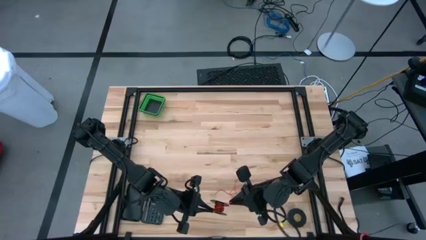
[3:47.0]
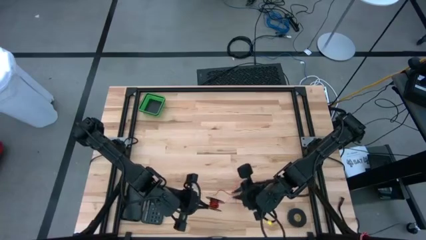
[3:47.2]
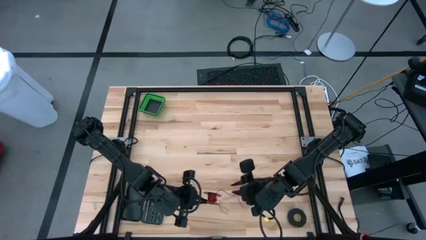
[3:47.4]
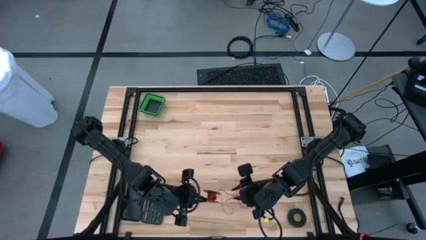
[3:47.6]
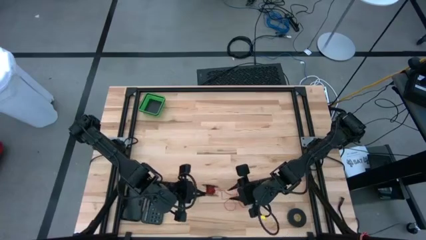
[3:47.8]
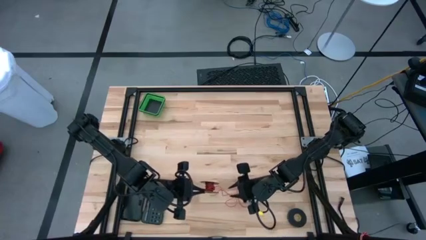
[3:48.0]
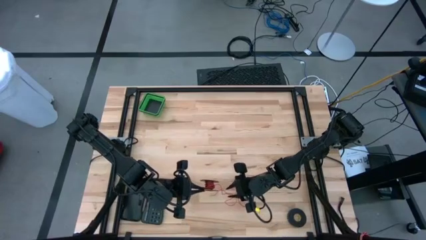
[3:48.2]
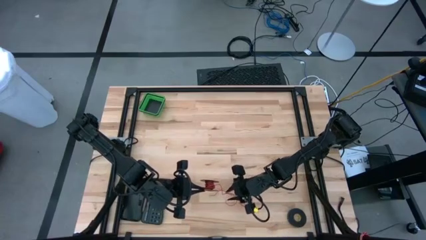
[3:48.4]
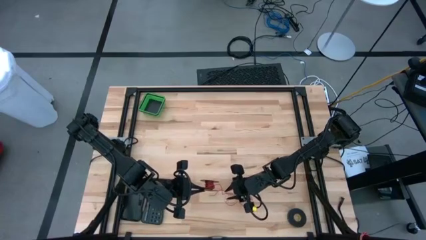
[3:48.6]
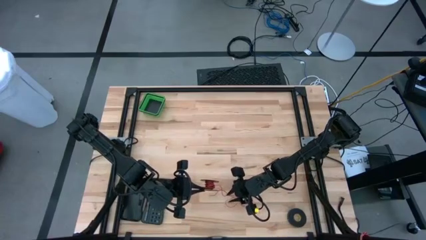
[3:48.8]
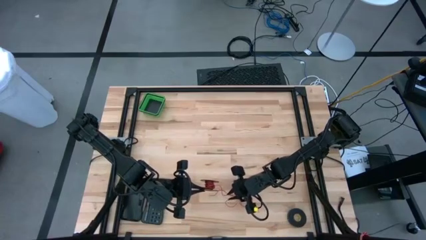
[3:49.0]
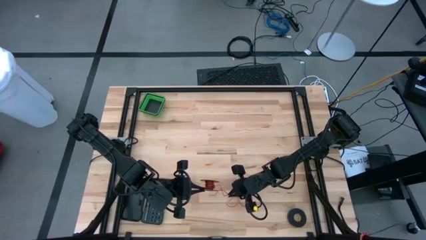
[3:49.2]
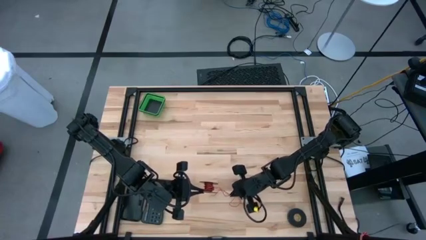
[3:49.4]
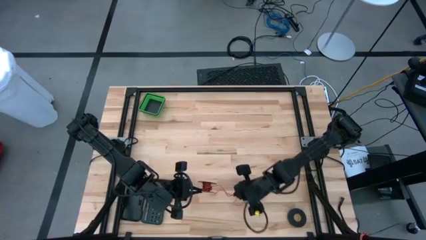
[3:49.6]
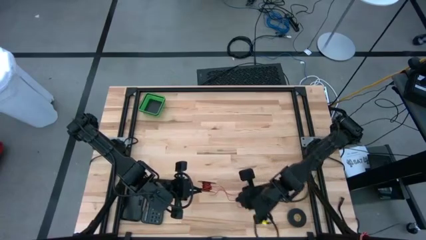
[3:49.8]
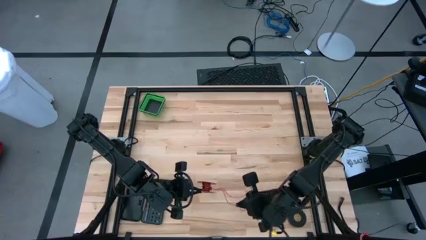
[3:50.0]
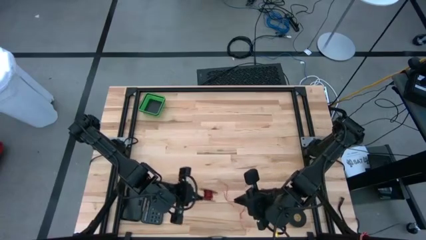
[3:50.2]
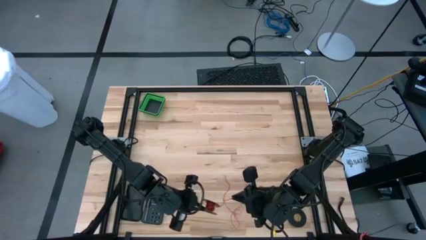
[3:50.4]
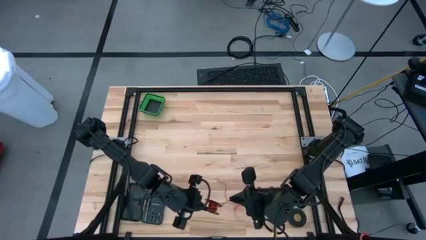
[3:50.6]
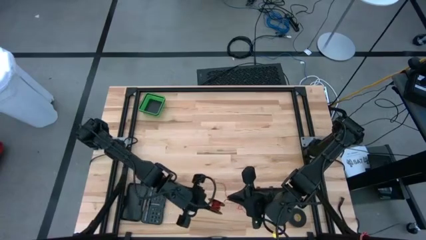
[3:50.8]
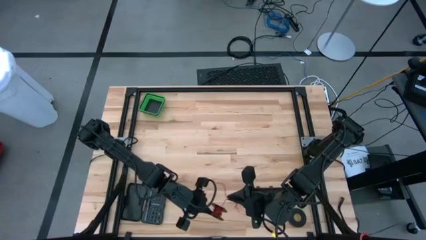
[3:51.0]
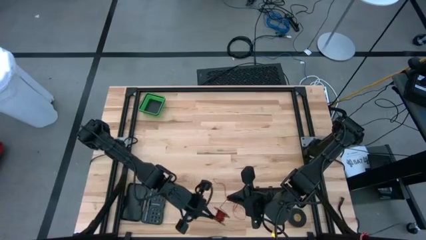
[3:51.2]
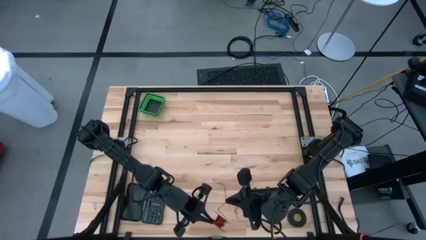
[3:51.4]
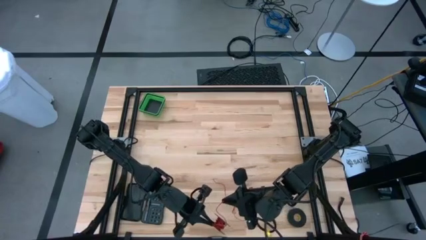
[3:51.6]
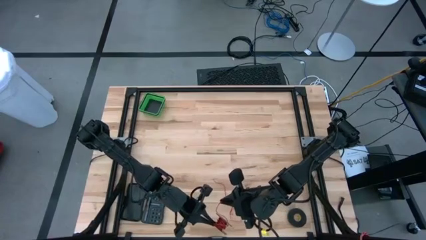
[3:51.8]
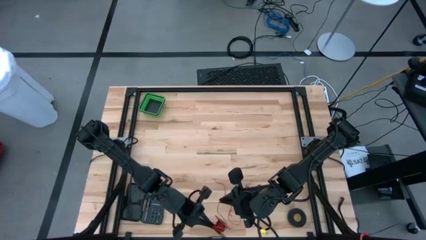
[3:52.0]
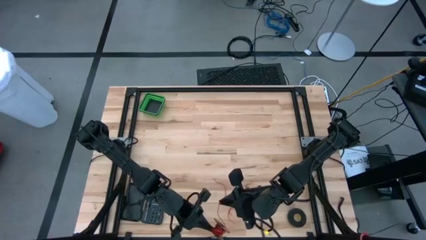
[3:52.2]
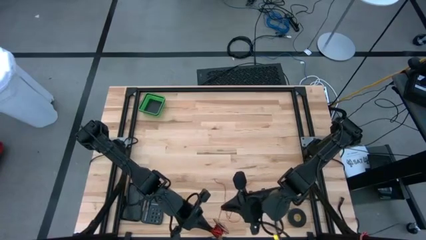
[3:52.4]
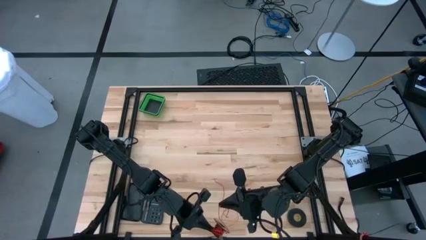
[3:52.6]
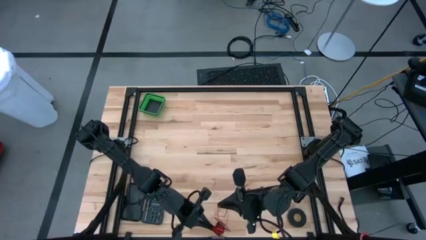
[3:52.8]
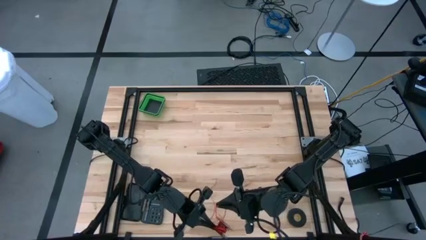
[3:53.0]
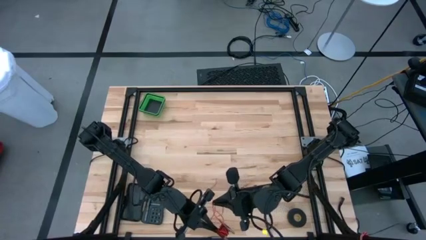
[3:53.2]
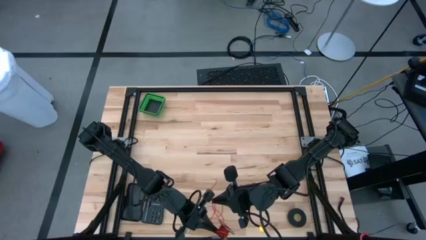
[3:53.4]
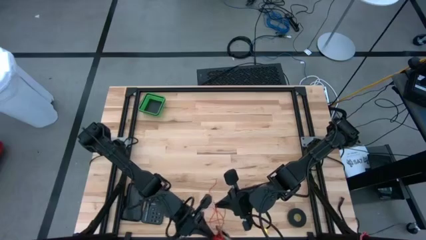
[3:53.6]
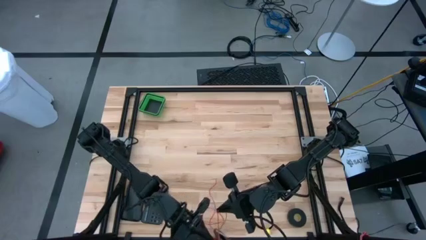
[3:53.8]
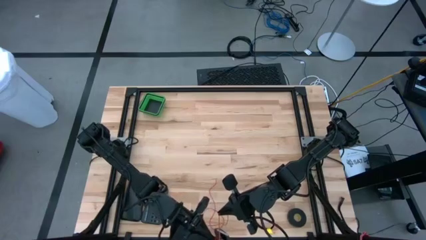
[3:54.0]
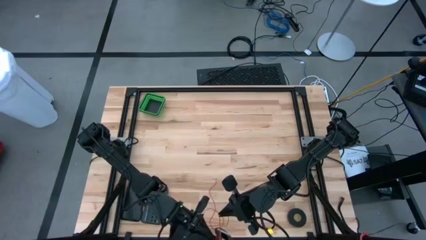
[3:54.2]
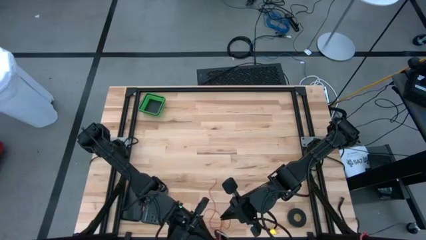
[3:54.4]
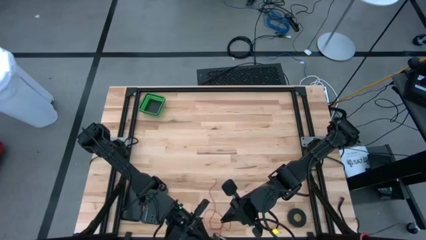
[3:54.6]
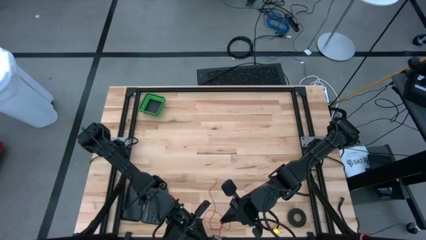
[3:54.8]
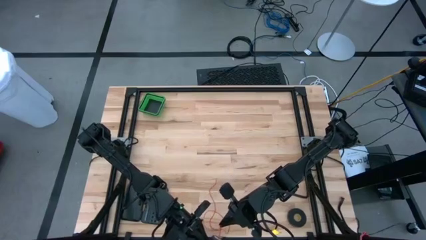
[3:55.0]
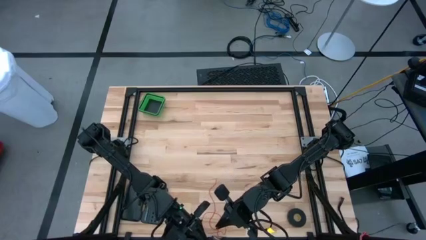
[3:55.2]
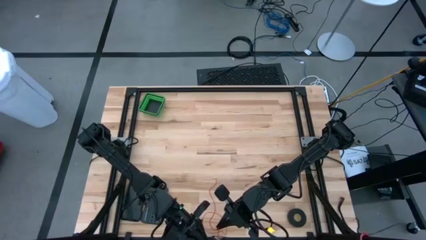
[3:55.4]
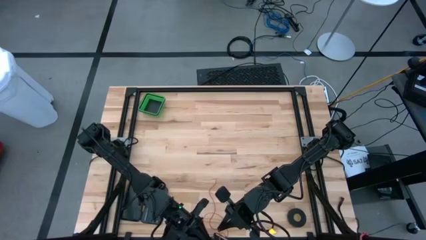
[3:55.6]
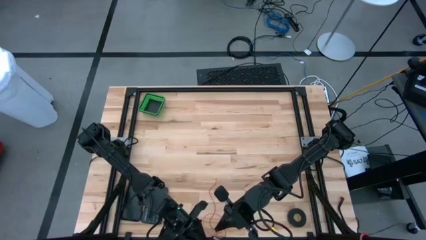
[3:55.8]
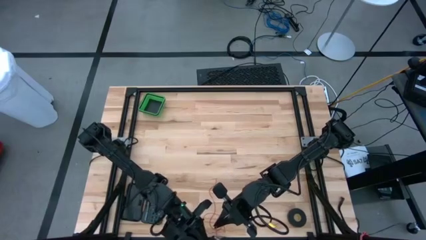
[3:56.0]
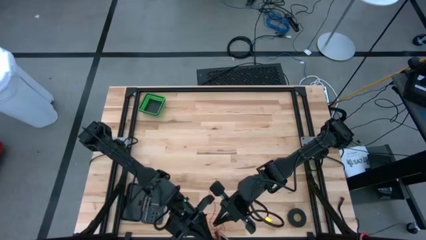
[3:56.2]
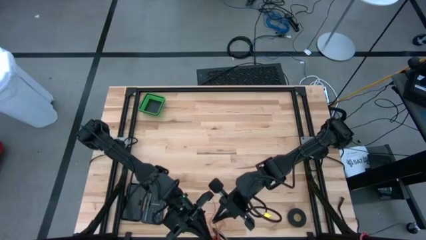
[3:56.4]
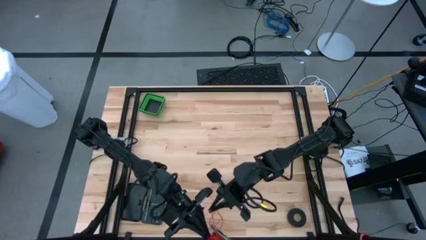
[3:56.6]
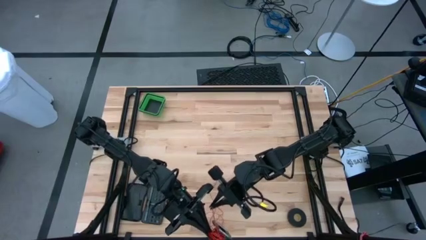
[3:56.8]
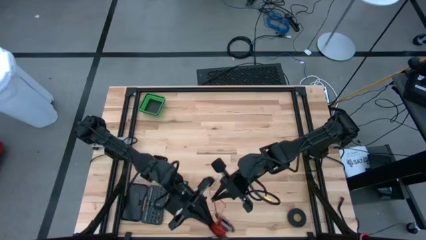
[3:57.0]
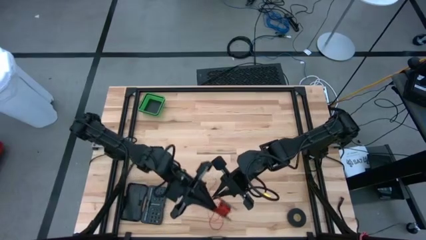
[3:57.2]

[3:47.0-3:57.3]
Task: Coil cords
Coil the red wire into the spool

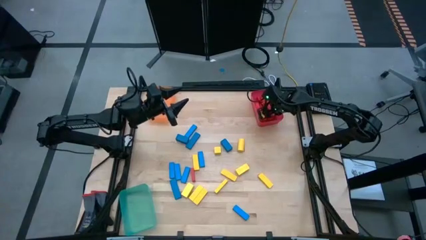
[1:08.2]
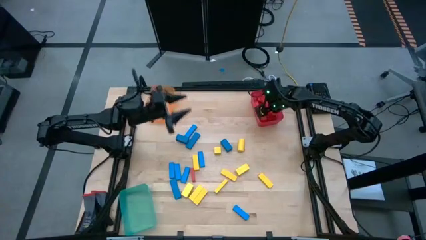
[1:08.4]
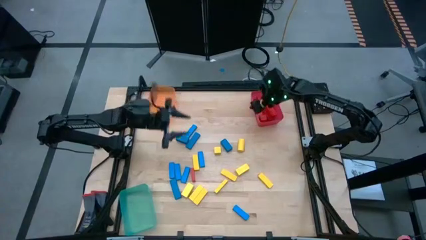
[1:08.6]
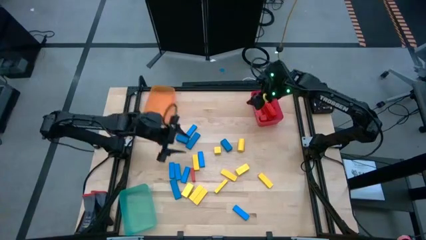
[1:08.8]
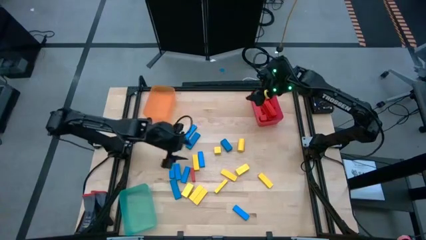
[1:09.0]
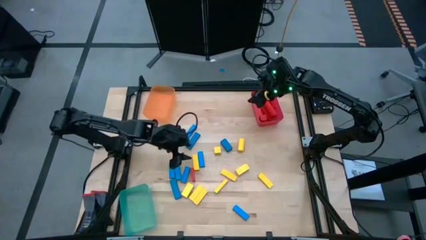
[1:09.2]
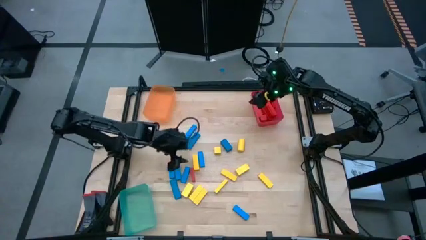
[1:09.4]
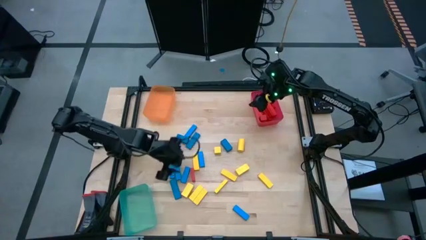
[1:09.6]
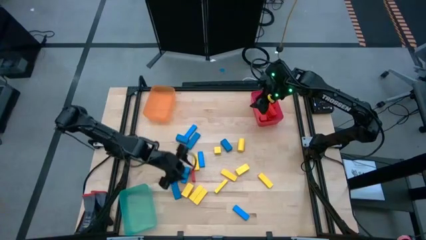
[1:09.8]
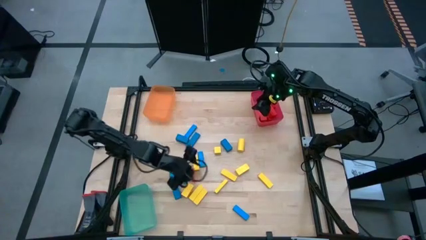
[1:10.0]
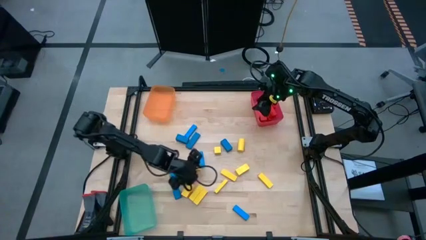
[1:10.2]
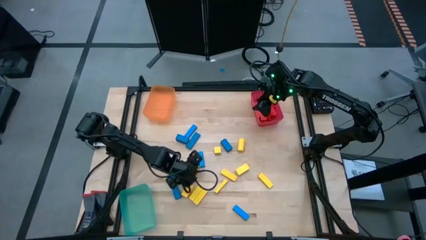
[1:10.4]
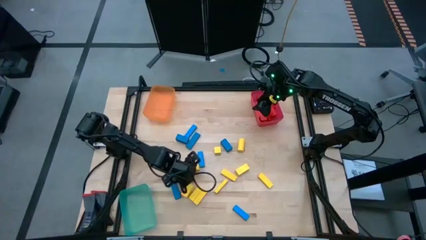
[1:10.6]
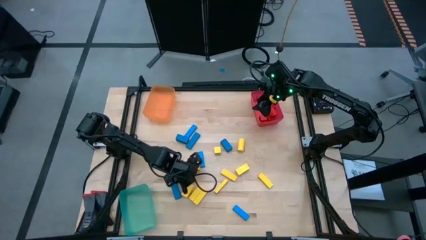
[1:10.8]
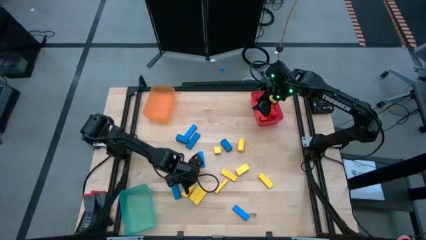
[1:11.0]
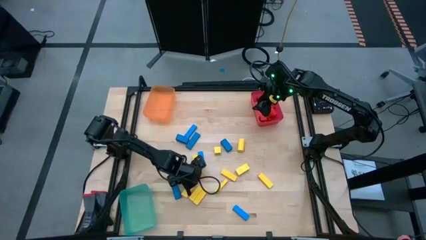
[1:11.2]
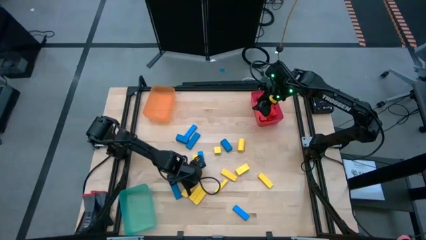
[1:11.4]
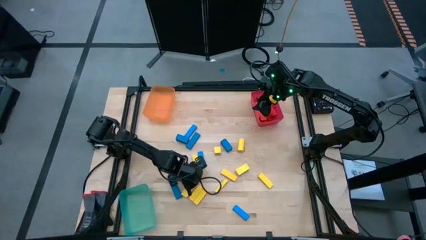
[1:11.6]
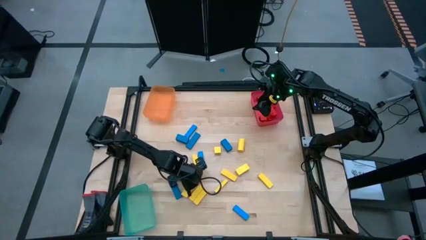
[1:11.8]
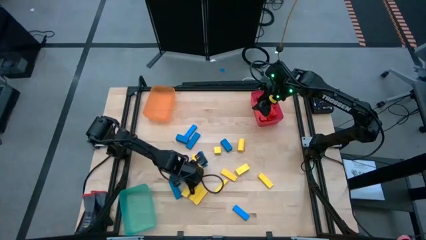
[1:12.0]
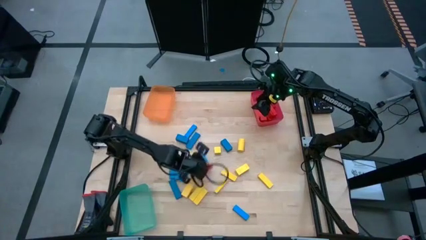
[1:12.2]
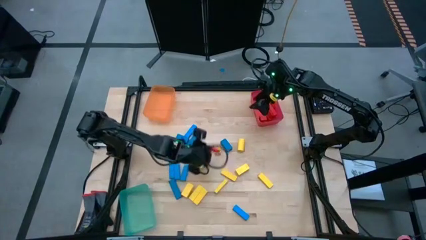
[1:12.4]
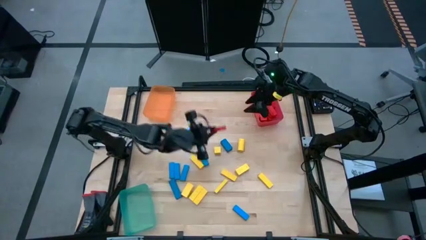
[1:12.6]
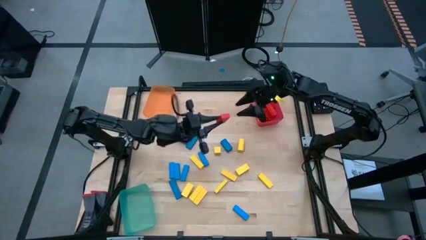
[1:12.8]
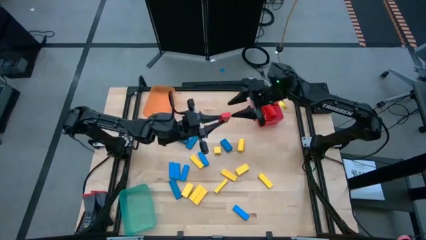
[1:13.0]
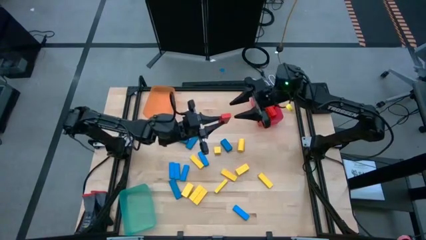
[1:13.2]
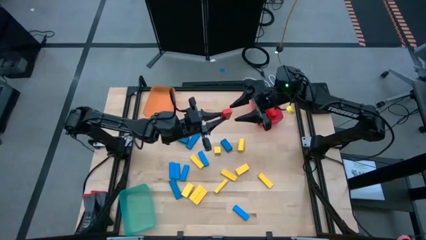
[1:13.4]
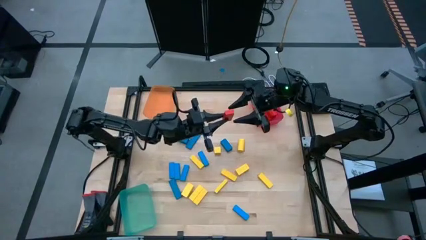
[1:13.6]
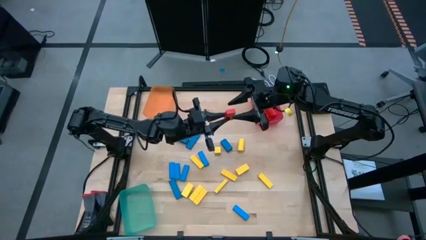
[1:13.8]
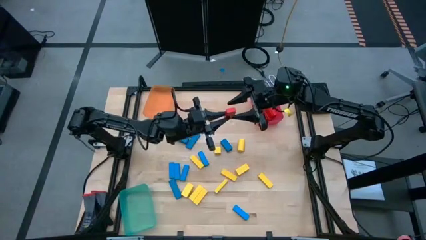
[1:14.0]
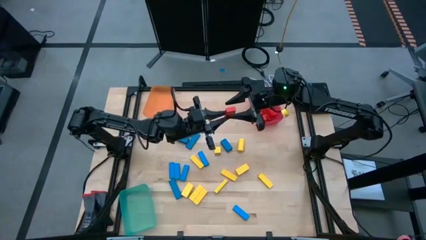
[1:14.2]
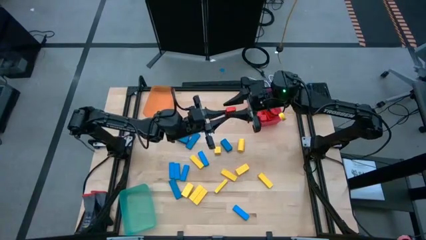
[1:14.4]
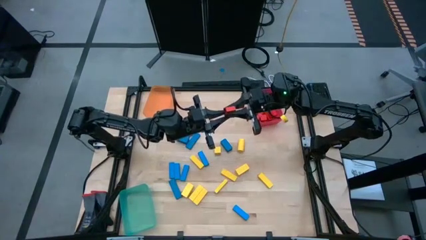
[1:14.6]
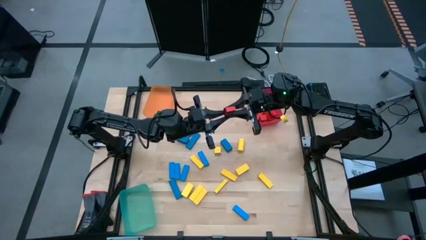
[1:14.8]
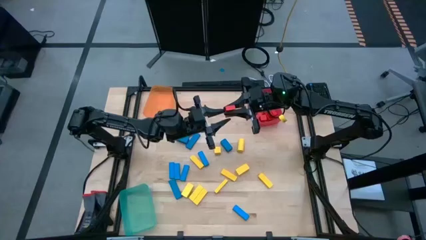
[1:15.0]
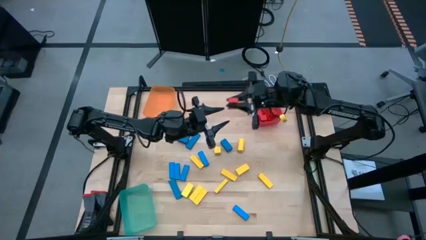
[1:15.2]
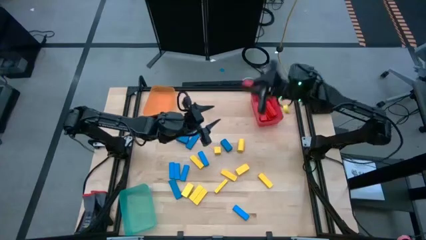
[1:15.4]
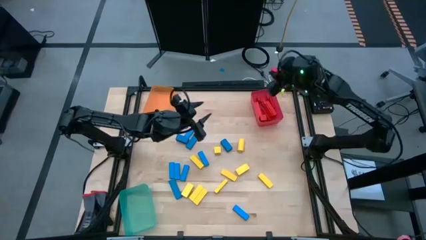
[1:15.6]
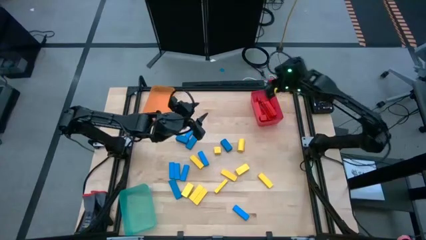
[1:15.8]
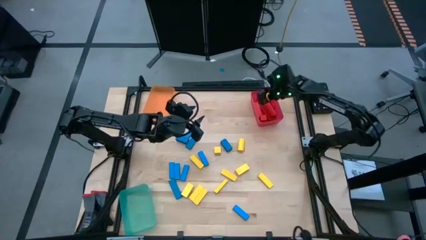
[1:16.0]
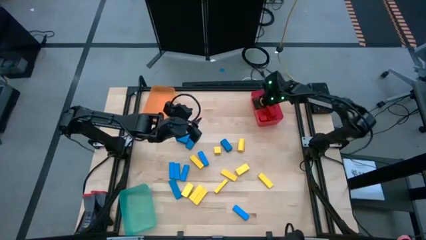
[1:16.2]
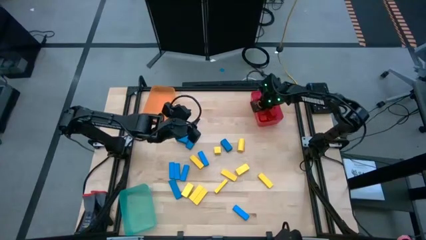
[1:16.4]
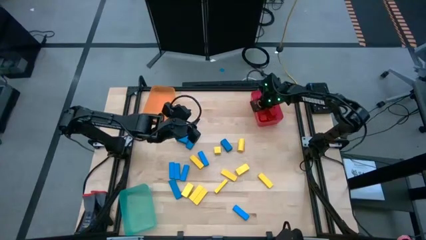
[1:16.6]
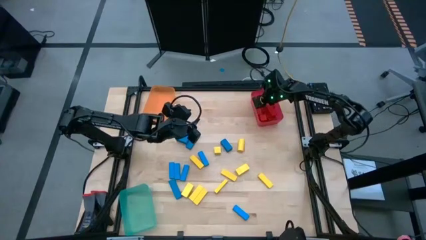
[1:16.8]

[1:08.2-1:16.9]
Task: Sort blocks
Put the red block into the red transparent bin
